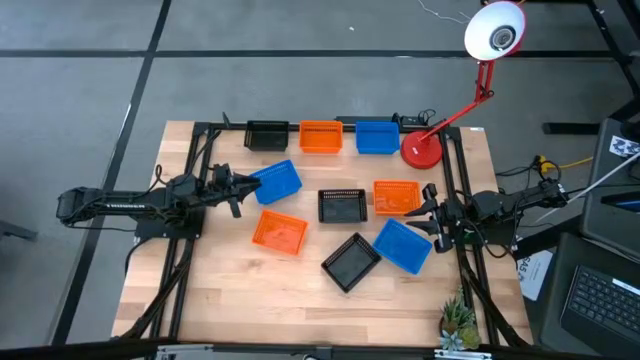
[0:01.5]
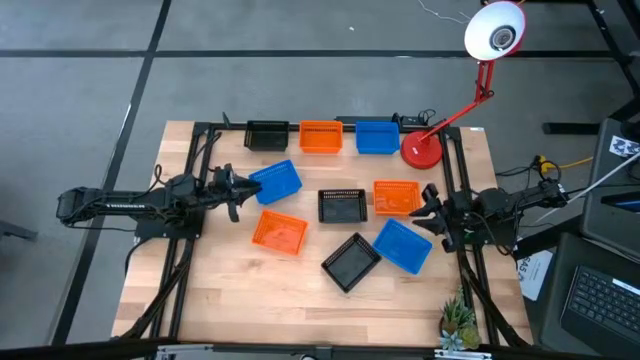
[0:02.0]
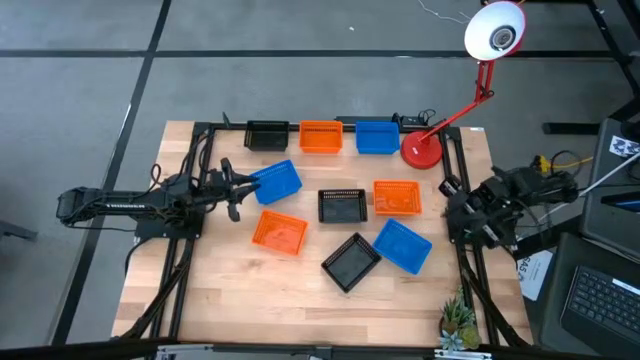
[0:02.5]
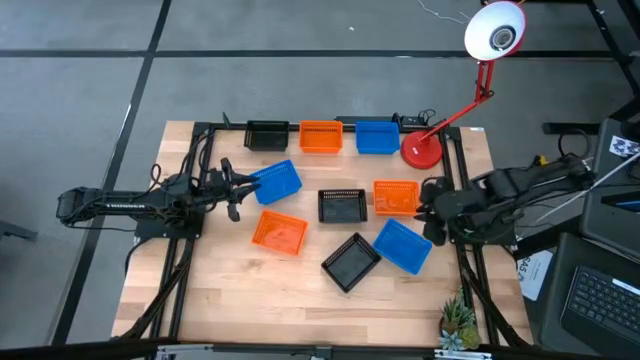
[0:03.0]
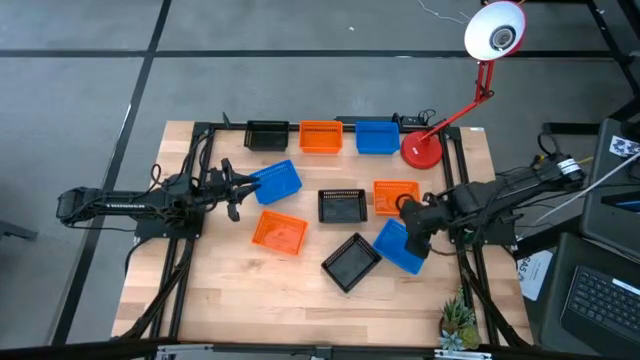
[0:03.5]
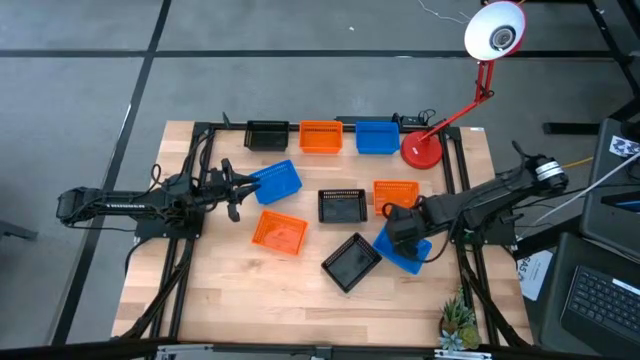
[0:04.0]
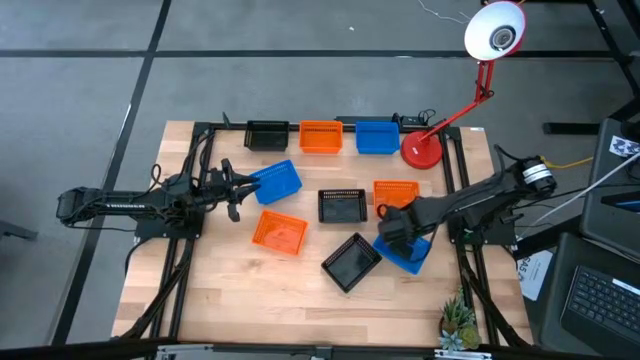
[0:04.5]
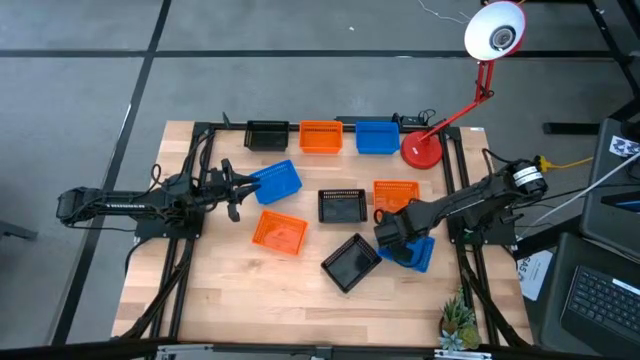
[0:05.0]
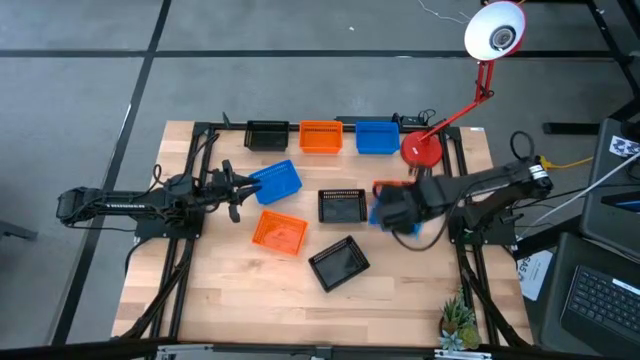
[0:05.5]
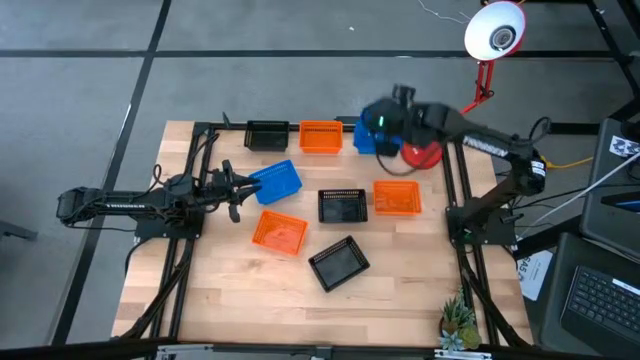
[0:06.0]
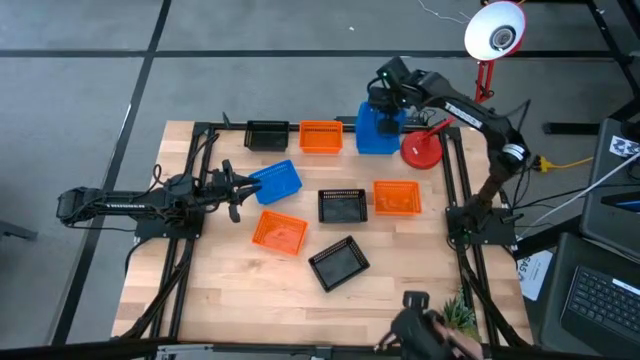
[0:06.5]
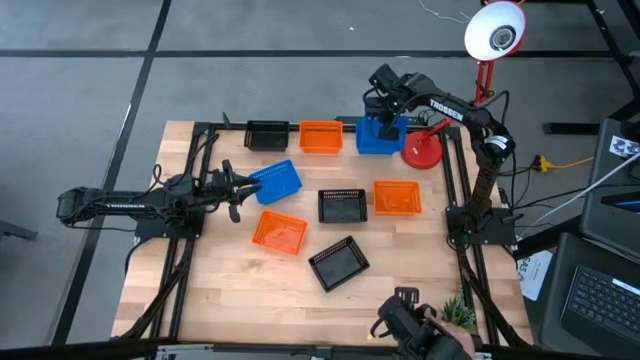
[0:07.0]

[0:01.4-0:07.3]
Stack the bottom blue basket on top of the top blue basket

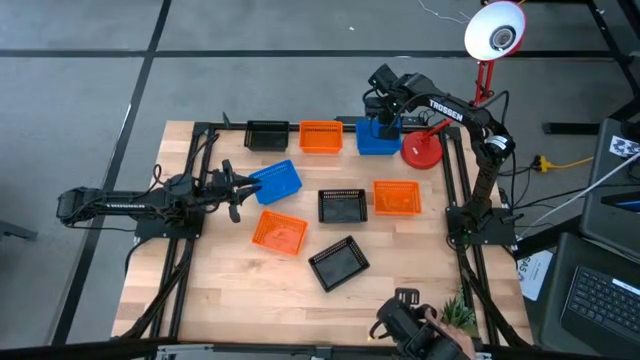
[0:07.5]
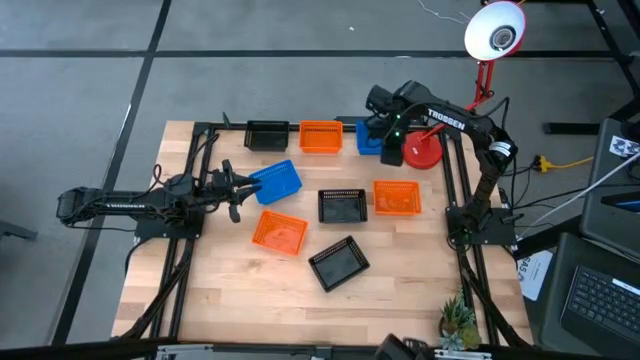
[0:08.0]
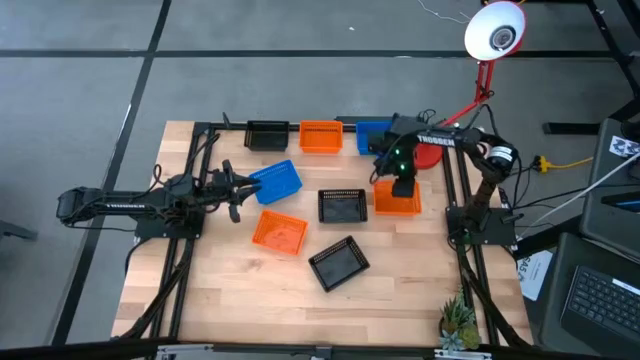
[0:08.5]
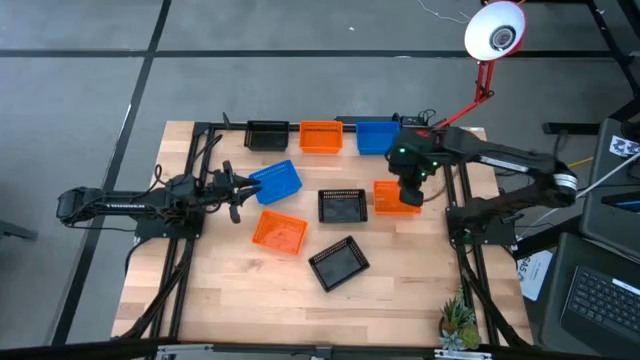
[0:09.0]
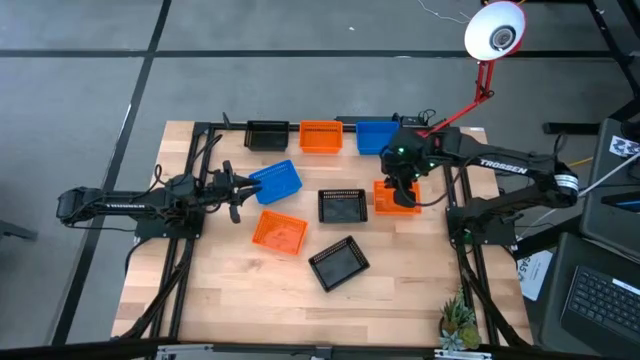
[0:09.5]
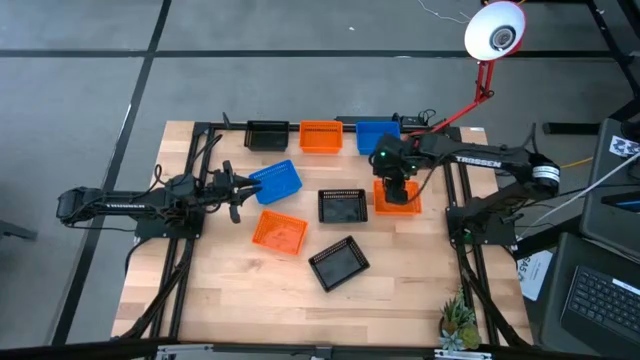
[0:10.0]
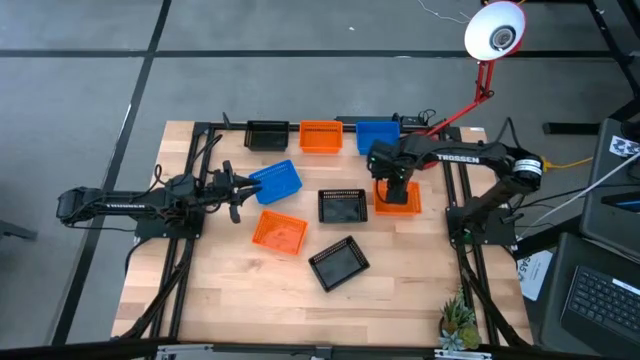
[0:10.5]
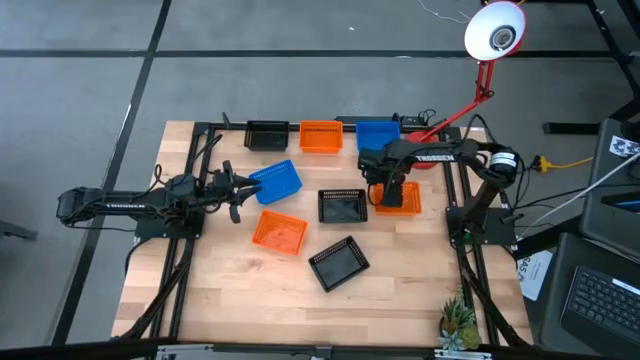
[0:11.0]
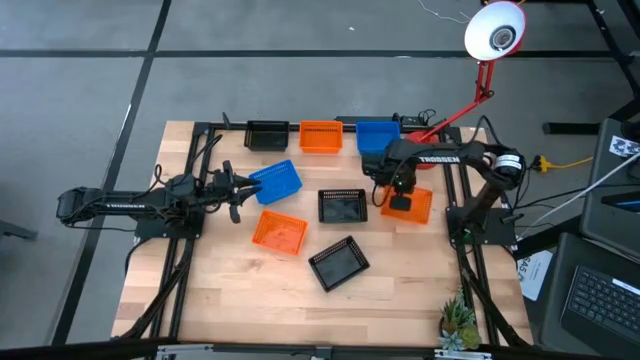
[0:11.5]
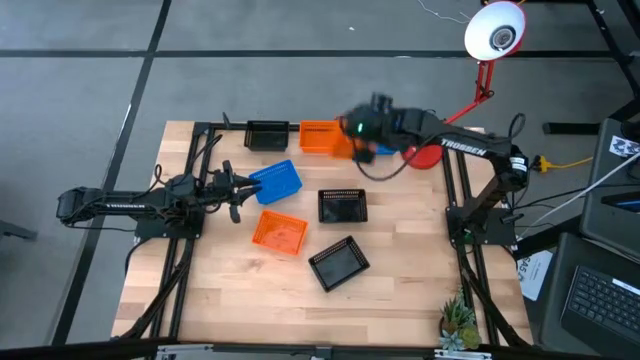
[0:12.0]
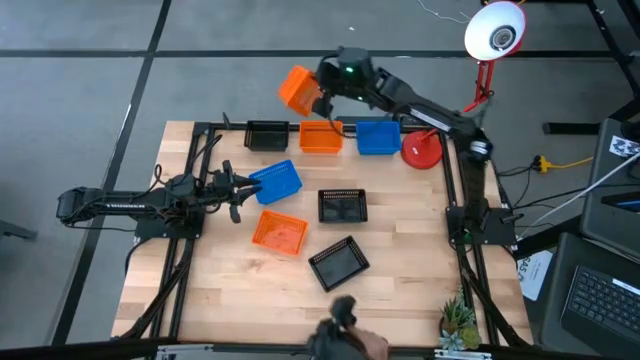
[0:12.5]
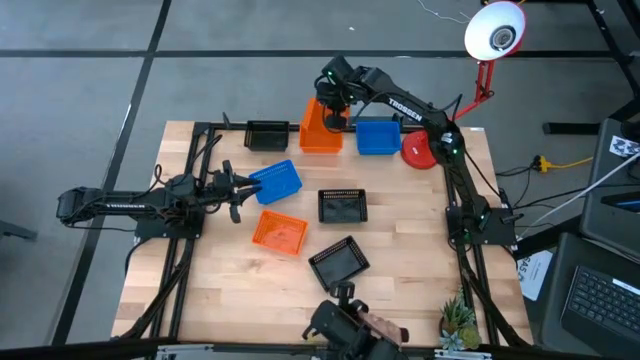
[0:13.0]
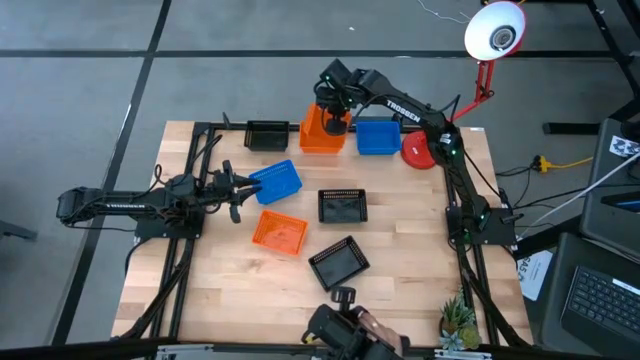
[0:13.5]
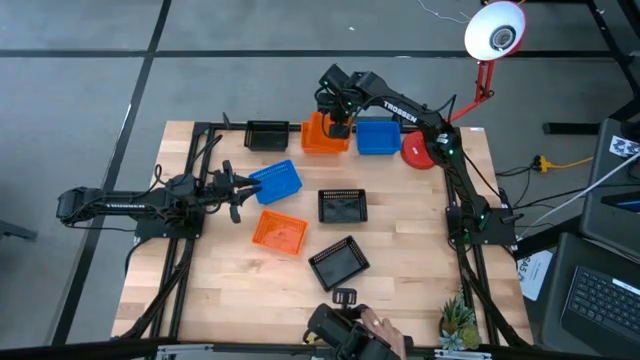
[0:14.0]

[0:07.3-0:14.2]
Stack the right orange basket on top of the top orange basket

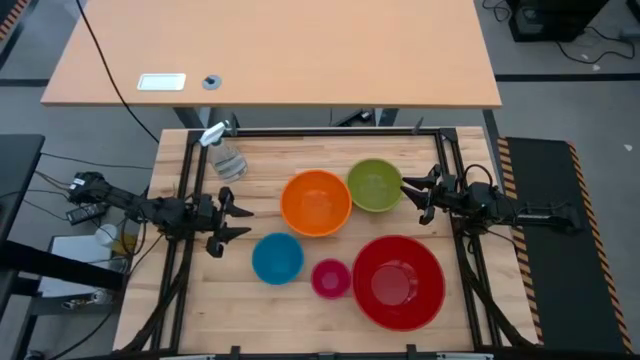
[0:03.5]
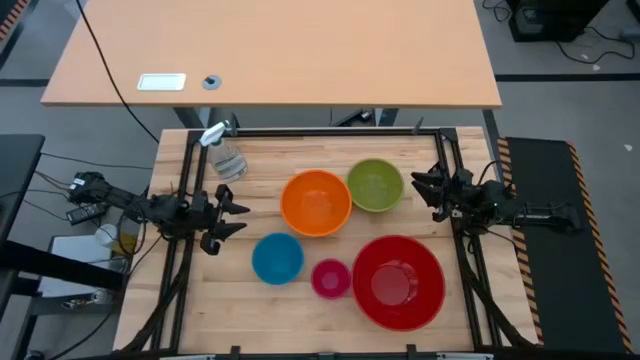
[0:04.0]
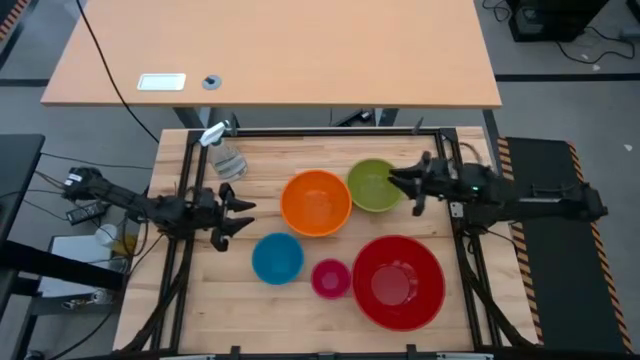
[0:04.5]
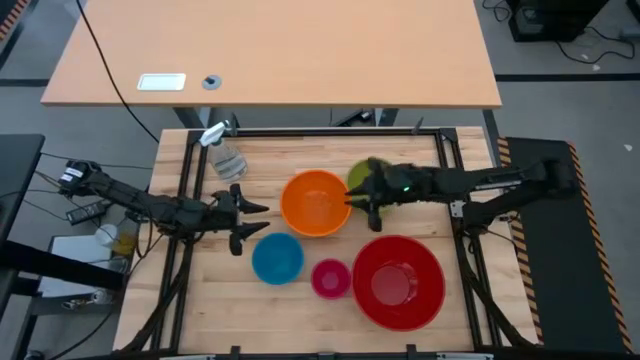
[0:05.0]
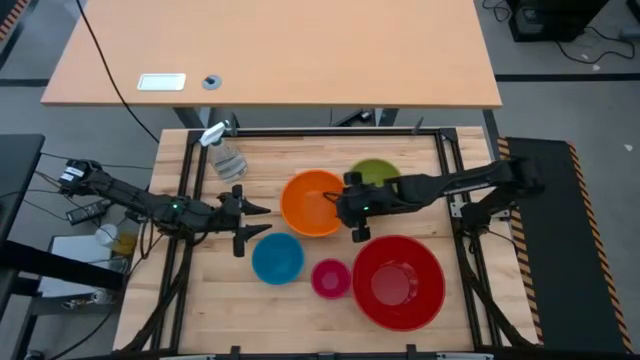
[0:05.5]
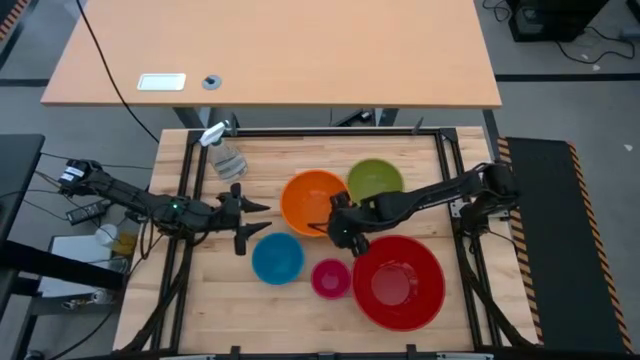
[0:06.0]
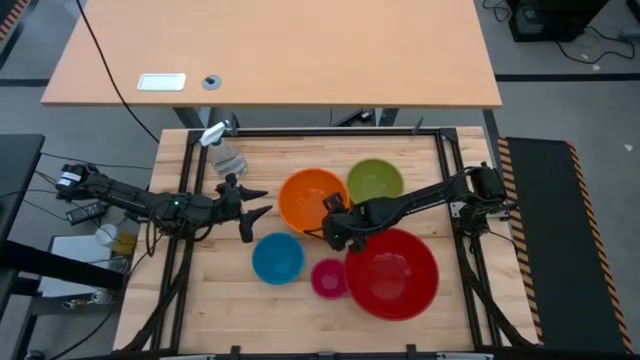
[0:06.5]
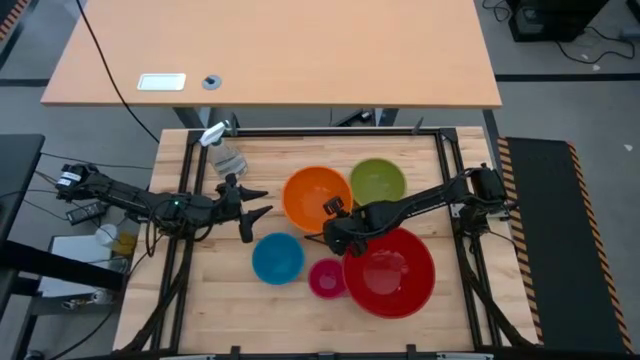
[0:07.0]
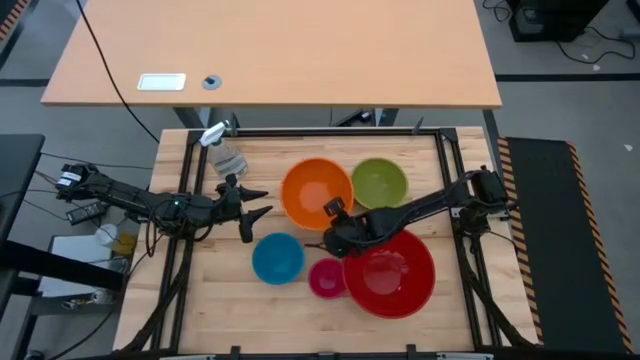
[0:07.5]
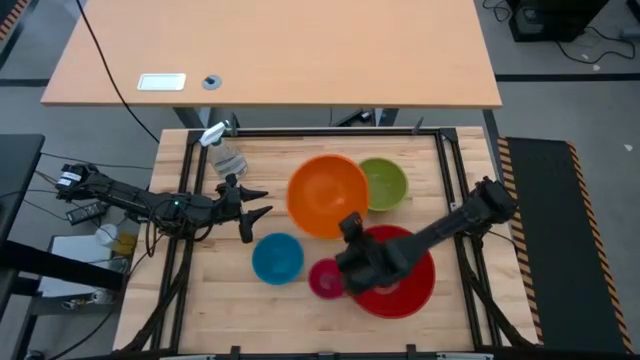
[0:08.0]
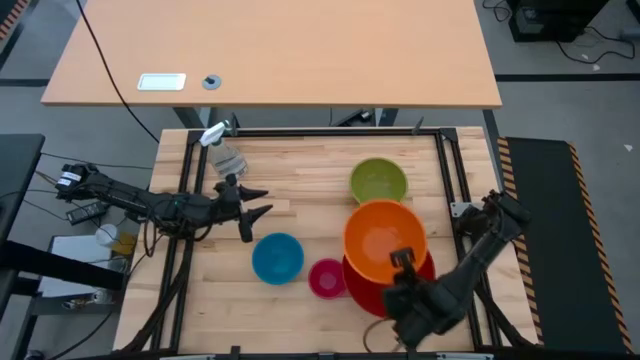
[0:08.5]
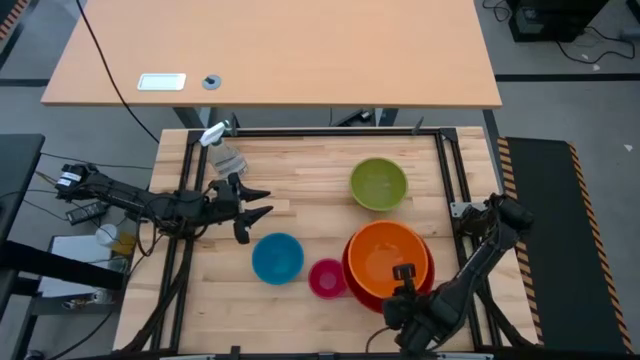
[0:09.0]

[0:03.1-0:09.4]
Stack the orange bowl on the red bowl

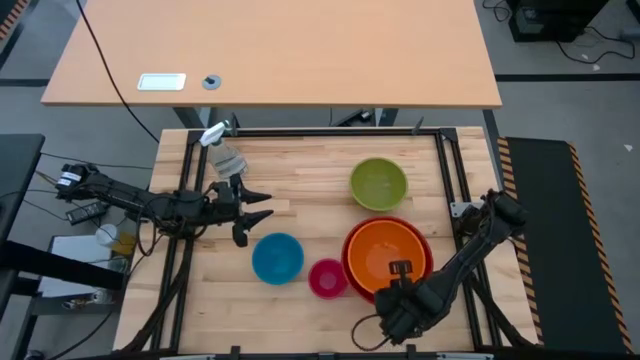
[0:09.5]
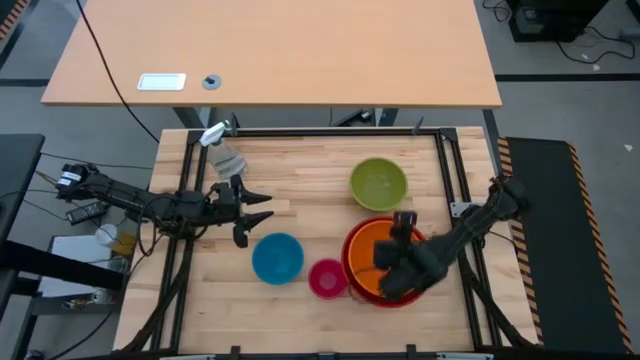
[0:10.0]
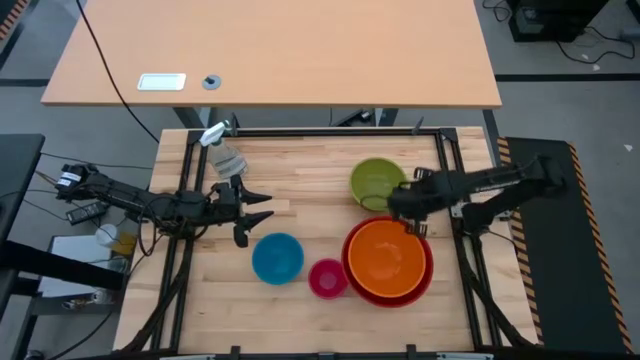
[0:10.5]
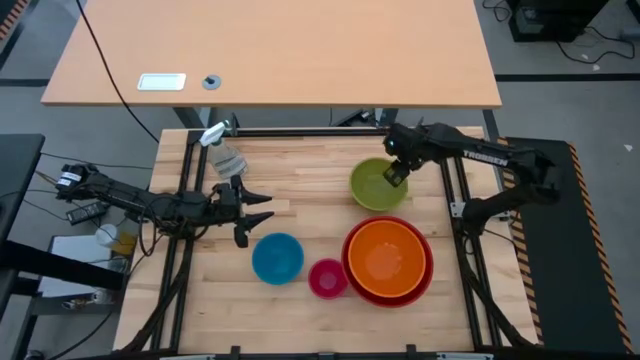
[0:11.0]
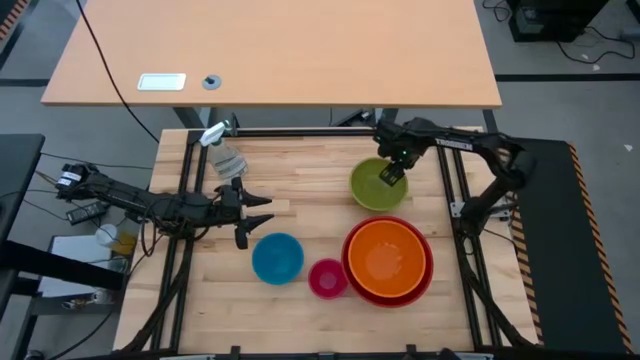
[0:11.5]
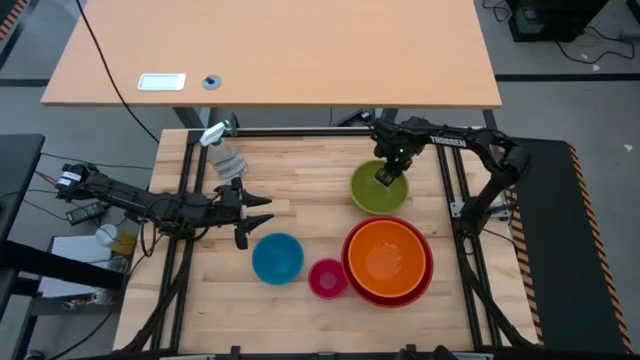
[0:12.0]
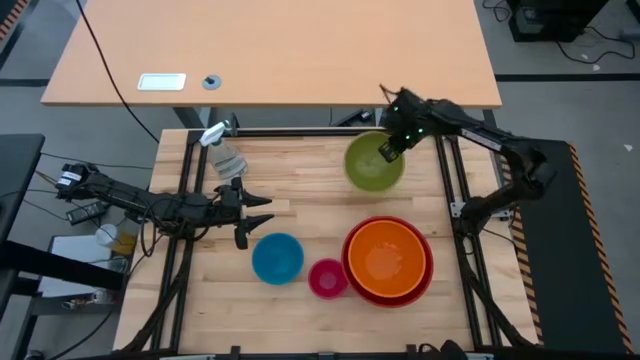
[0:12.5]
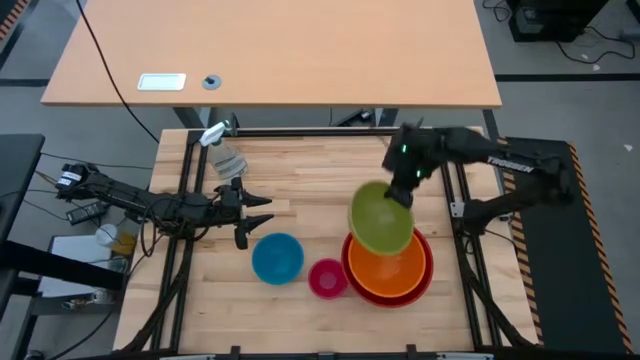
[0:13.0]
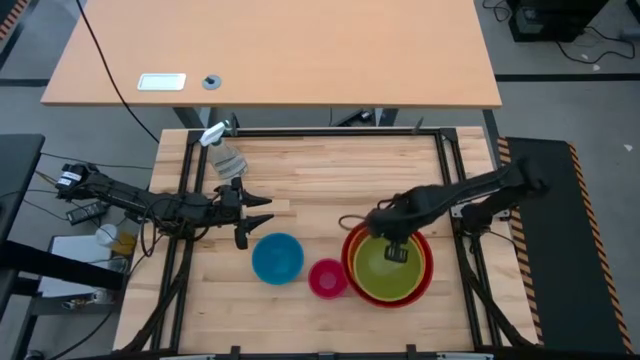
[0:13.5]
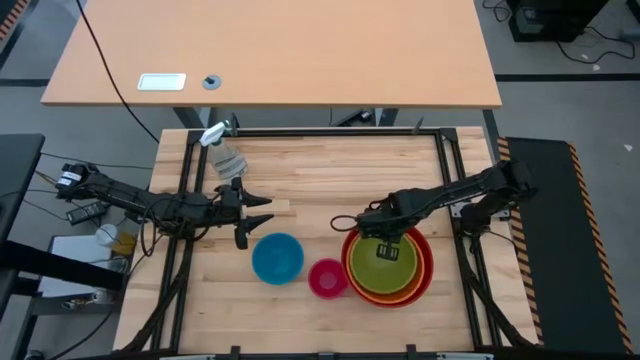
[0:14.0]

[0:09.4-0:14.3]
Stack the green bowl on the orange bowl
